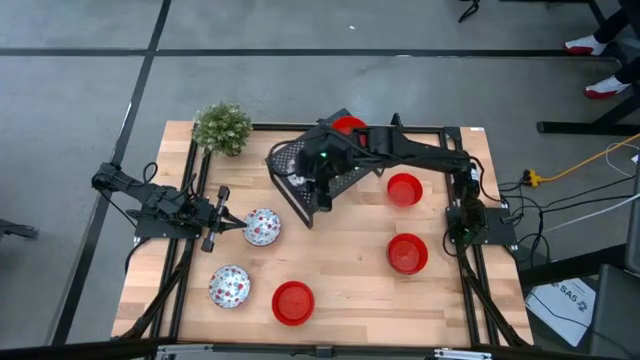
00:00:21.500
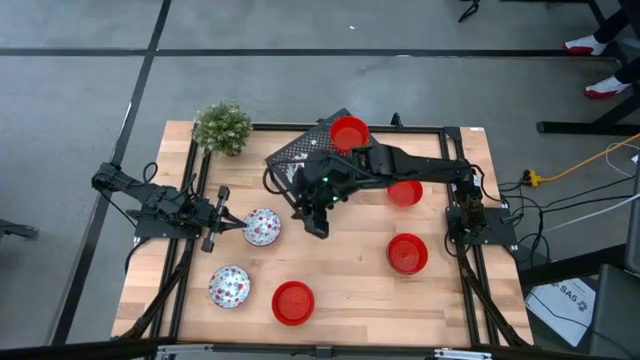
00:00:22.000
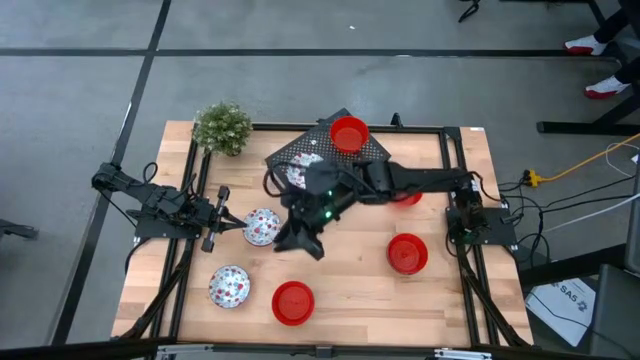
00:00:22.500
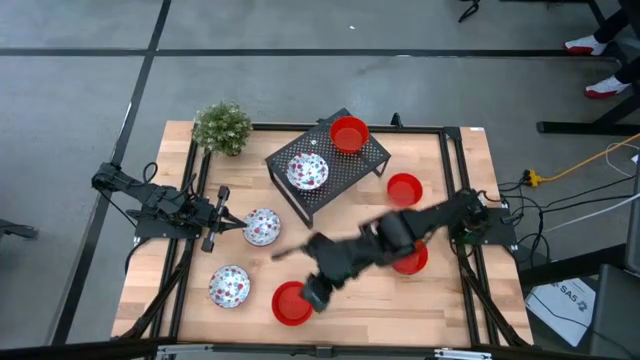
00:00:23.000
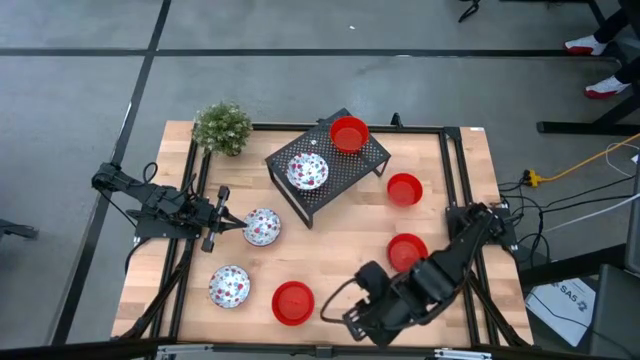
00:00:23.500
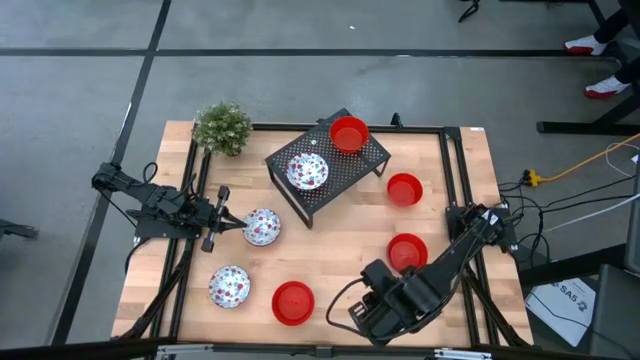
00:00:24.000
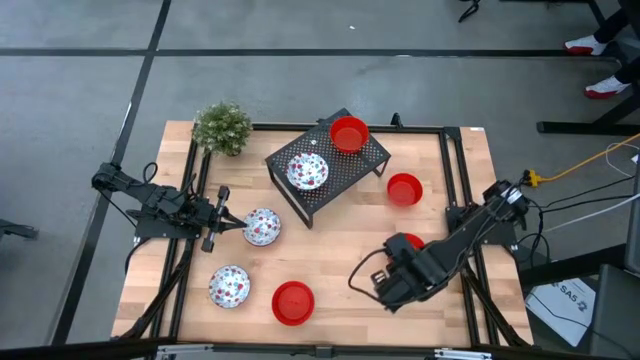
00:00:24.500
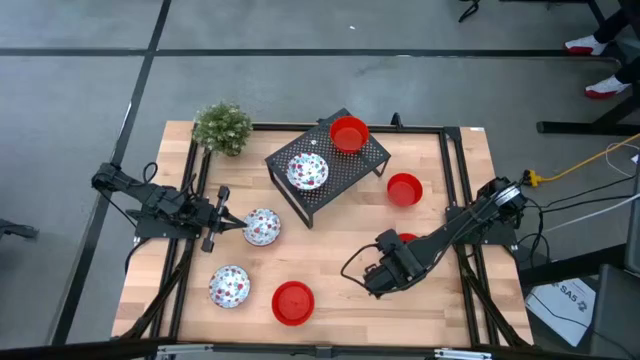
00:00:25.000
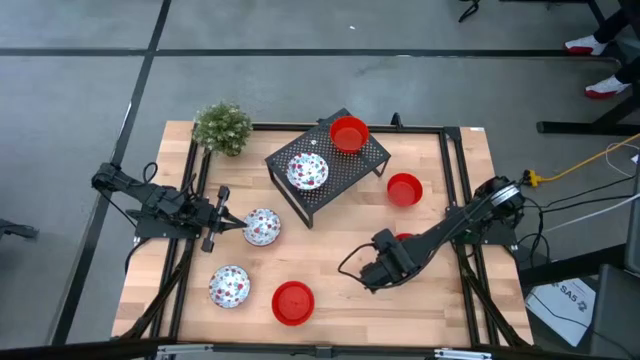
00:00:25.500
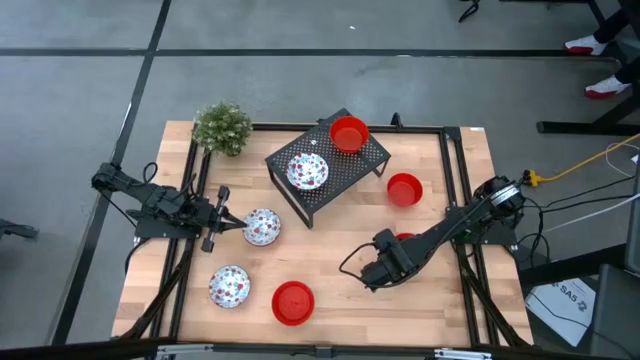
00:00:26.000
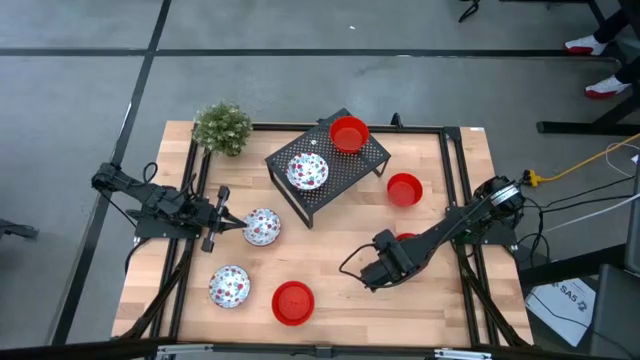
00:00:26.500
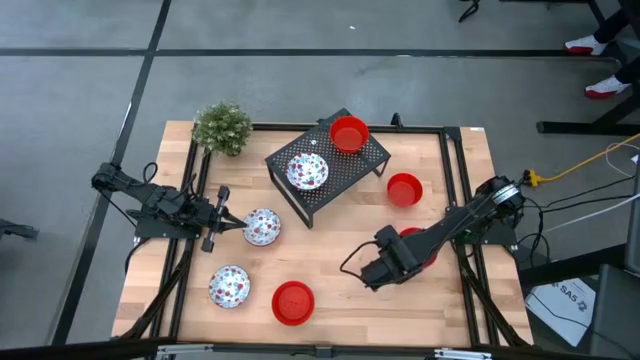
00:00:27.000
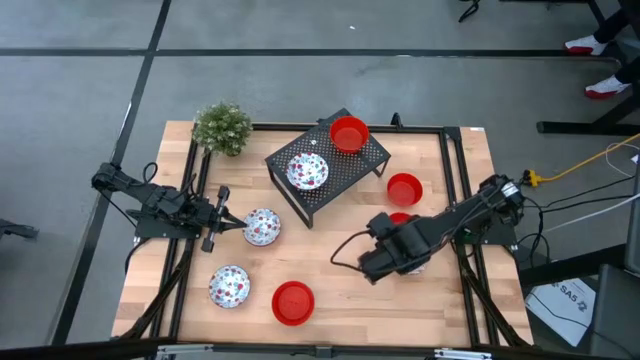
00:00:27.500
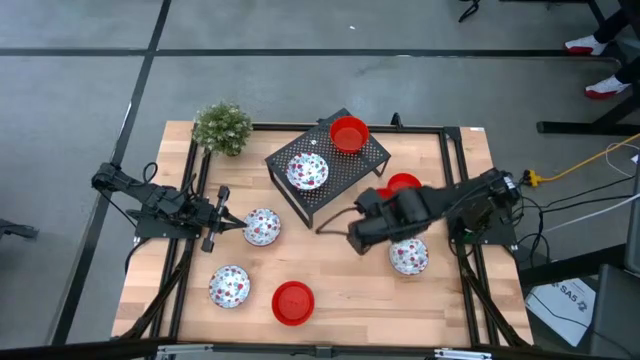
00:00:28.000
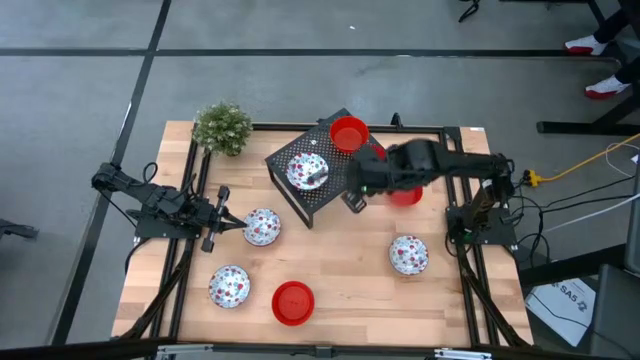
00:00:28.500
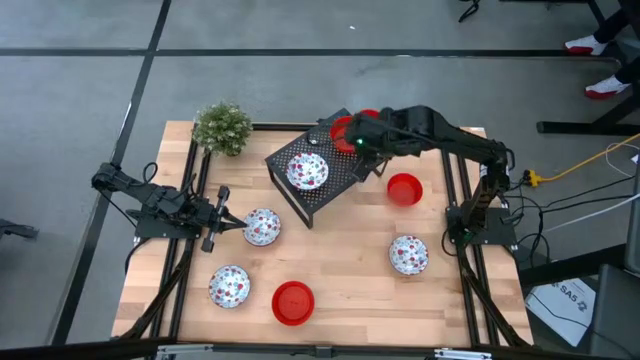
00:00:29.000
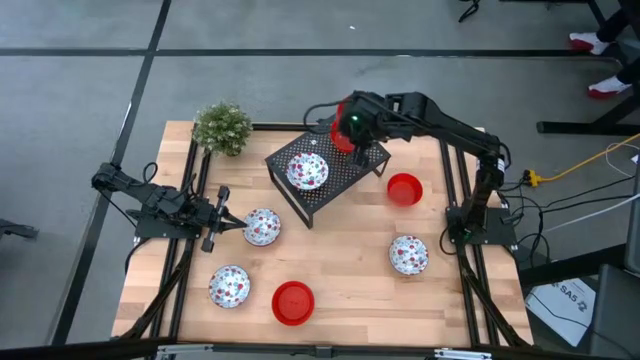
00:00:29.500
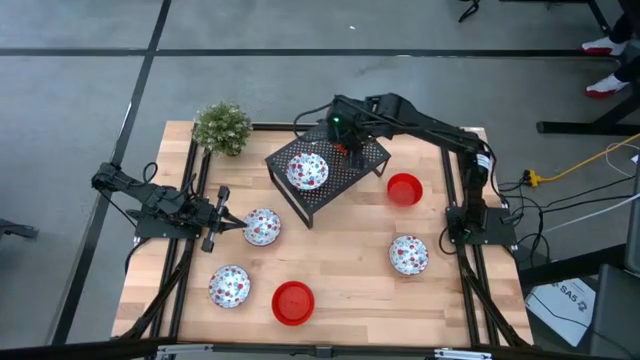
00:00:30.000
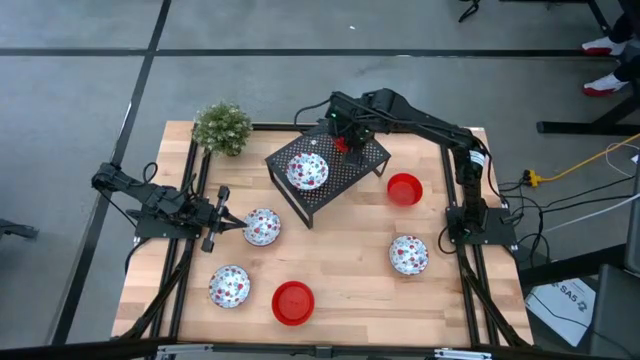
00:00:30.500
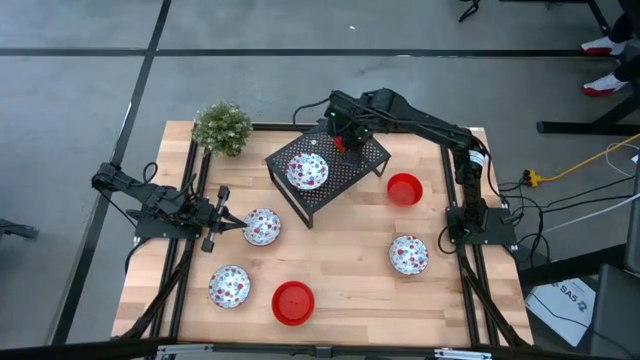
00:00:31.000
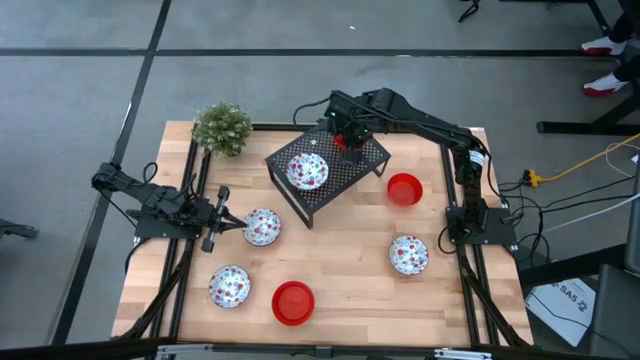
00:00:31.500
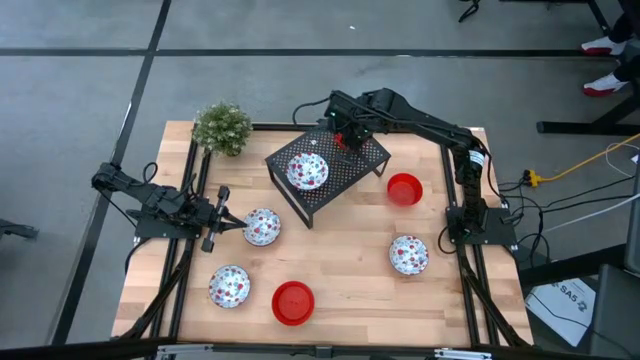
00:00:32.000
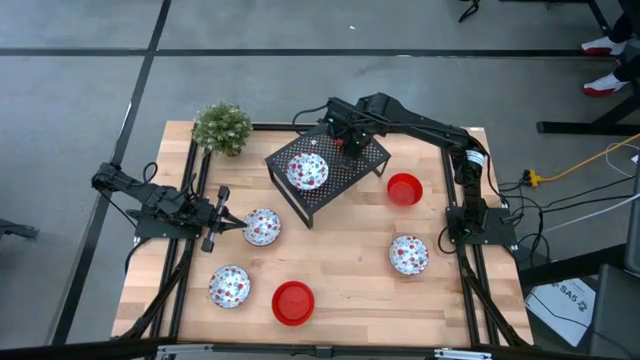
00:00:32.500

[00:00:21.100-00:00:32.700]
Task: Pick & Place Mini bowls
Stack the red bowl on the red bowl on the shelf

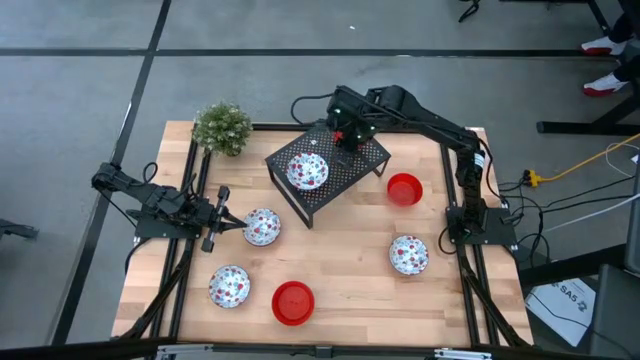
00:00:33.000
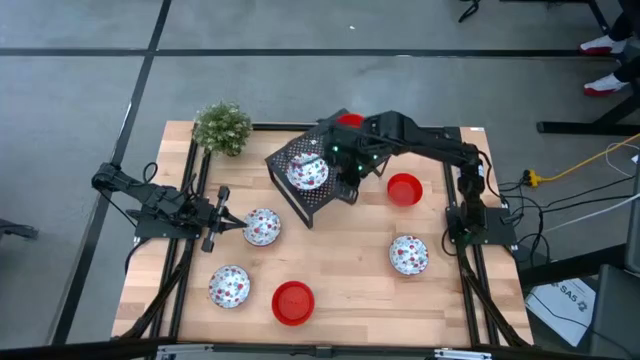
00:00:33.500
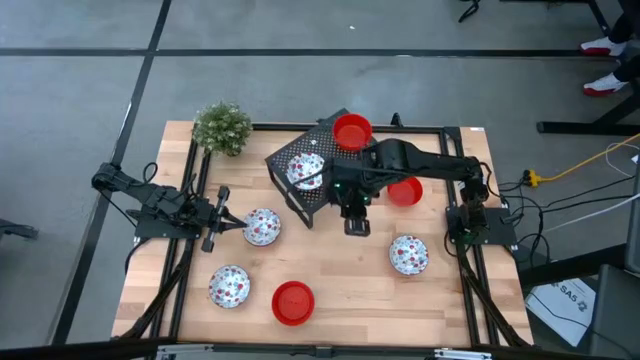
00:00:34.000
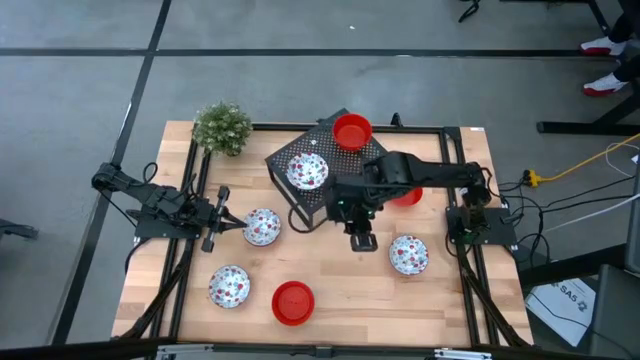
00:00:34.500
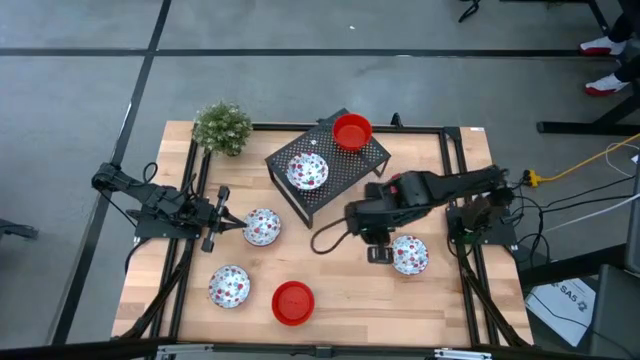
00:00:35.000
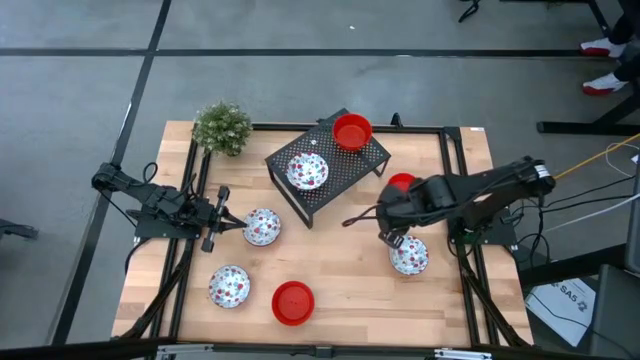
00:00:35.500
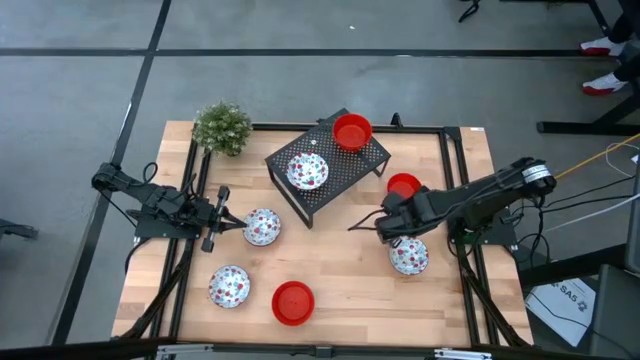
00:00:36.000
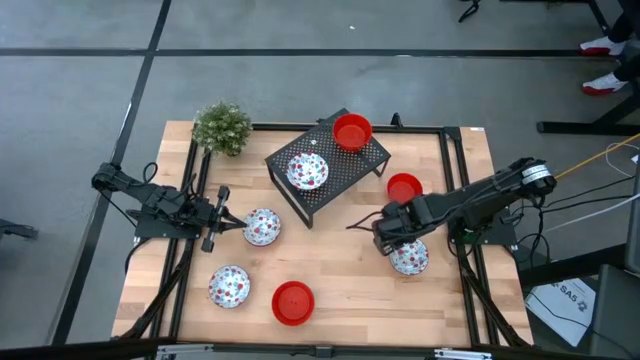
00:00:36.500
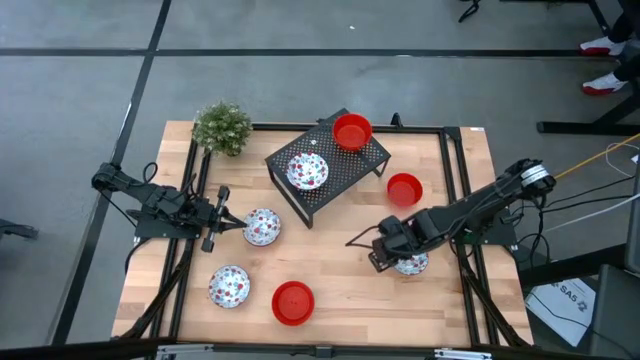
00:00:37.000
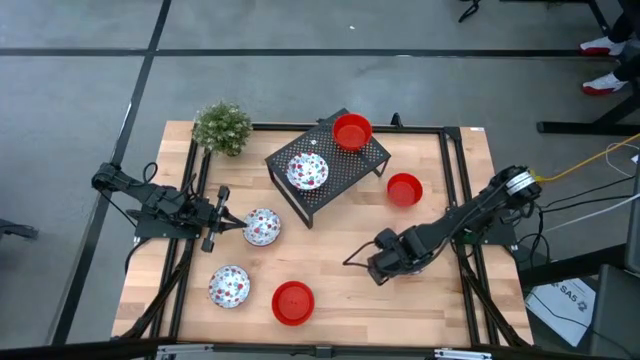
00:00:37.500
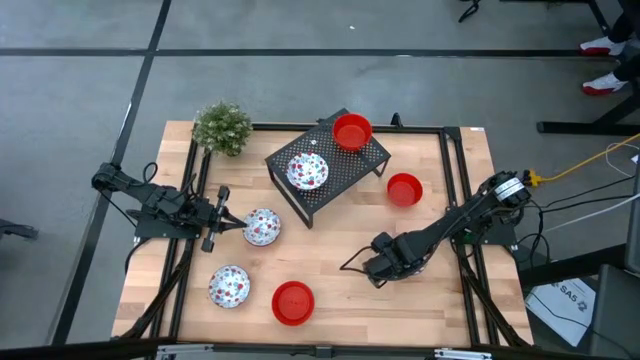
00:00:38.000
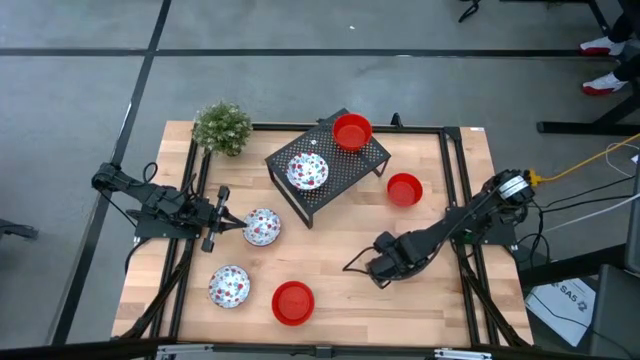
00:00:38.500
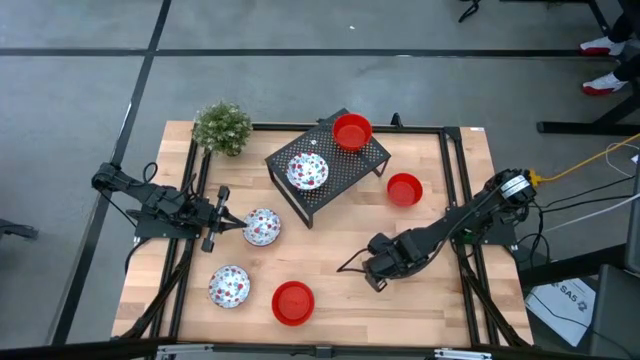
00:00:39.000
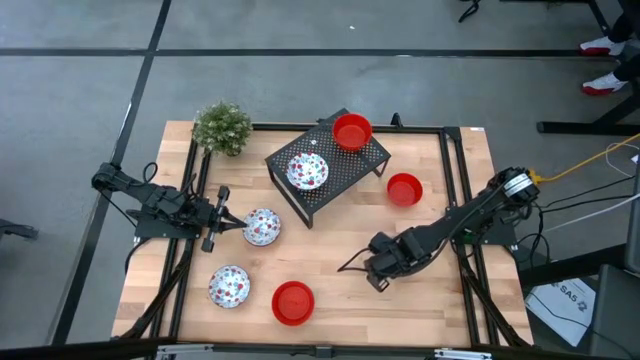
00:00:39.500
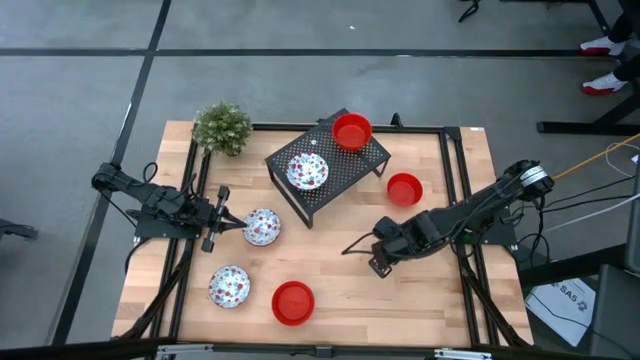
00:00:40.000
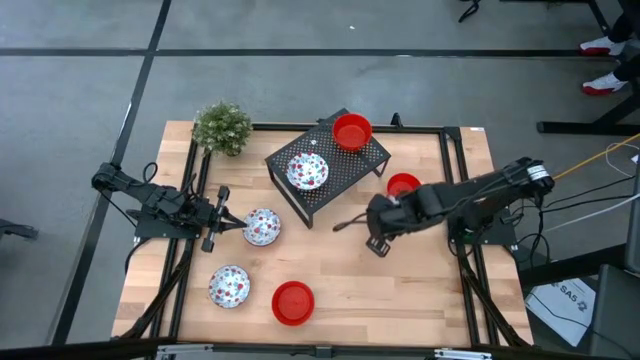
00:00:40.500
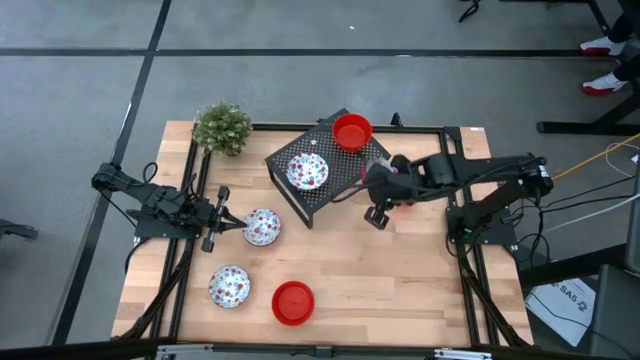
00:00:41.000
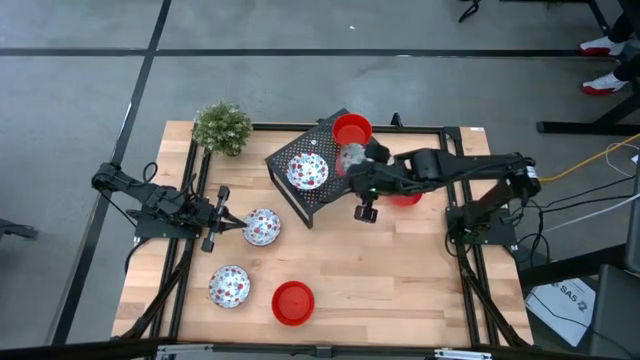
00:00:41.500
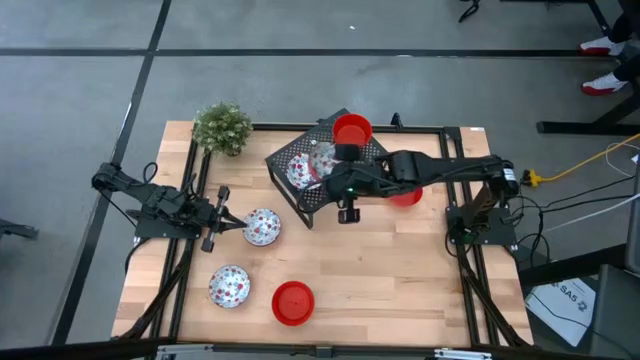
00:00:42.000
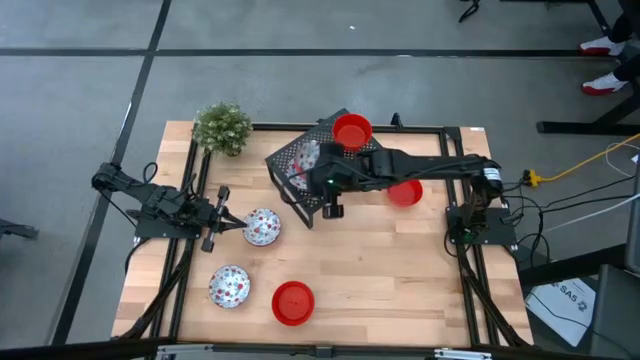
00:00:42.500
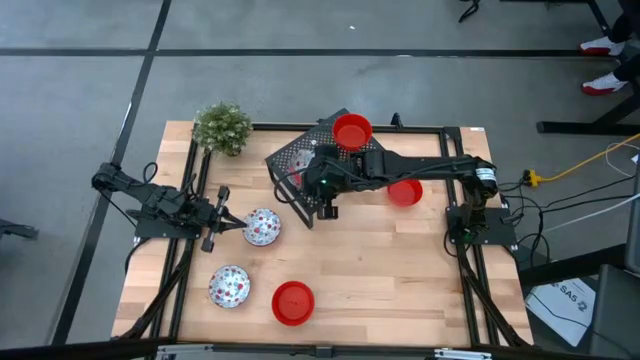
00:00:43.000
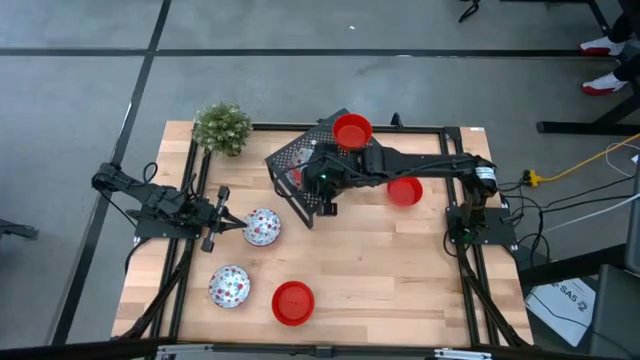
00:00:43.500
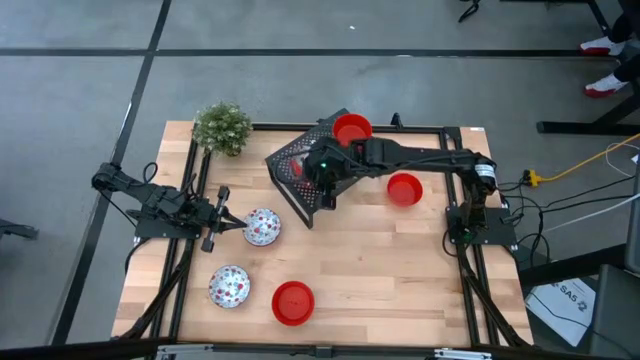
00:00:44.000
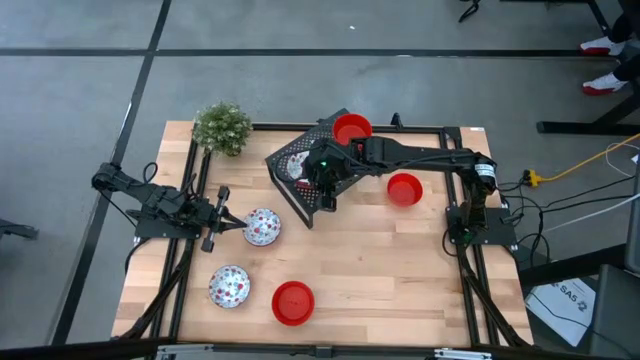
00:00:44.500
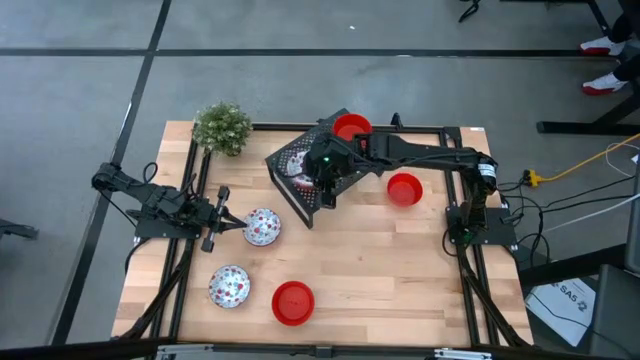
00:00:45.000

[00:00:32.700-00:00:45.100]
Stack the white patterned bowl on the white patterned bowl on the shelf
